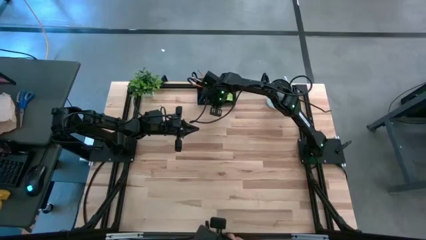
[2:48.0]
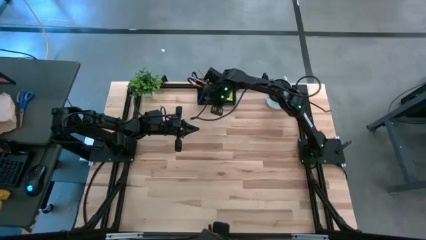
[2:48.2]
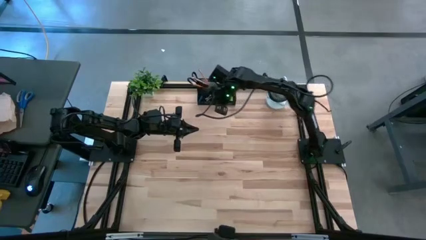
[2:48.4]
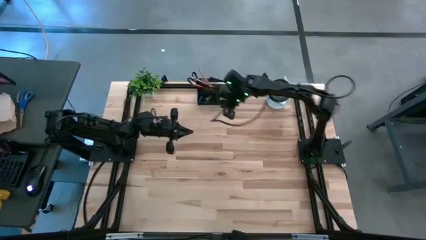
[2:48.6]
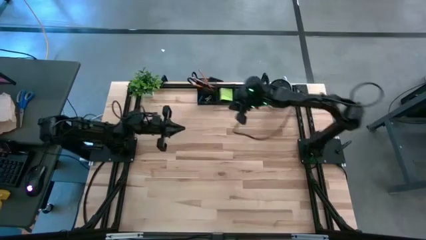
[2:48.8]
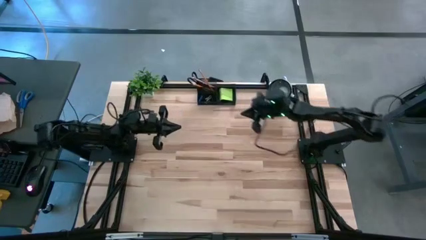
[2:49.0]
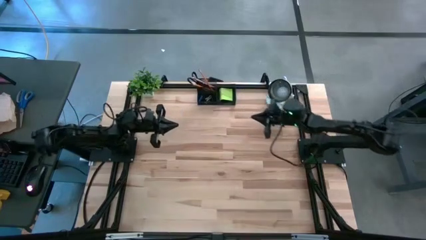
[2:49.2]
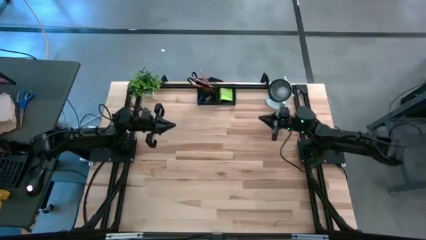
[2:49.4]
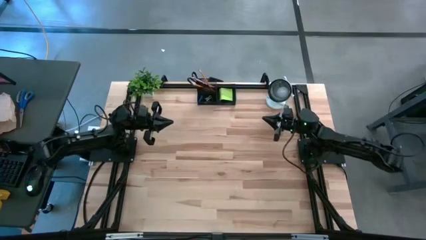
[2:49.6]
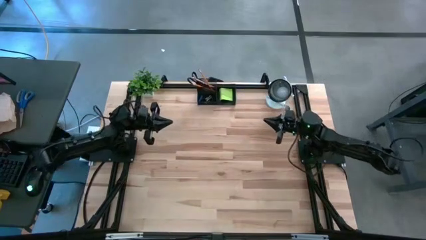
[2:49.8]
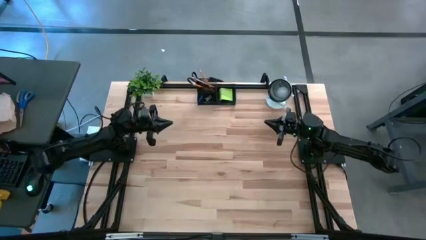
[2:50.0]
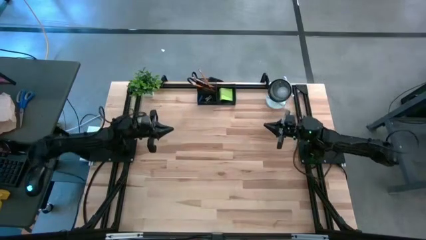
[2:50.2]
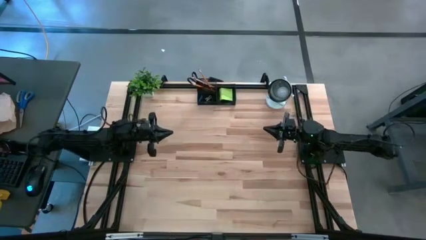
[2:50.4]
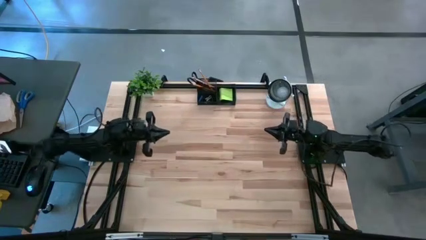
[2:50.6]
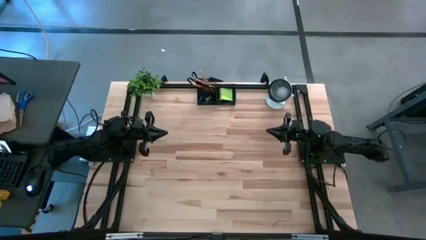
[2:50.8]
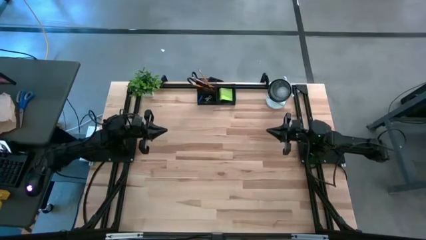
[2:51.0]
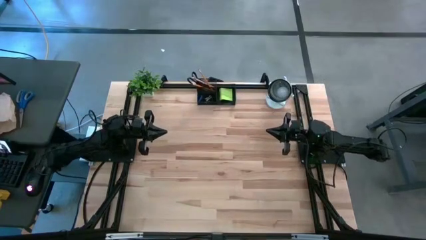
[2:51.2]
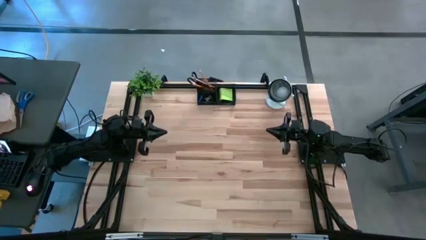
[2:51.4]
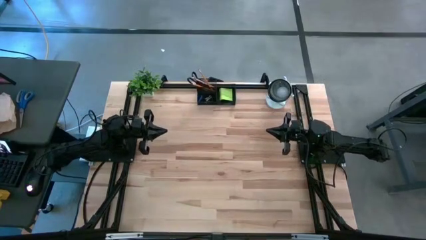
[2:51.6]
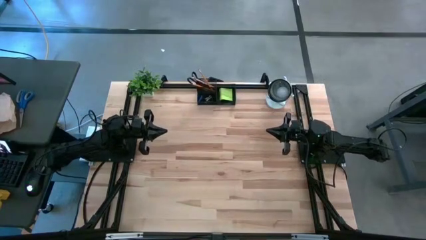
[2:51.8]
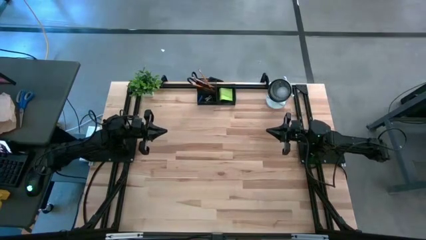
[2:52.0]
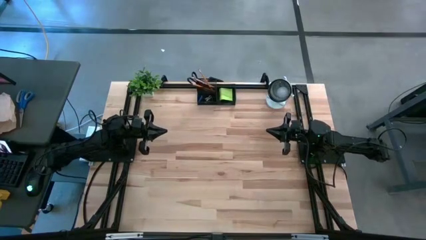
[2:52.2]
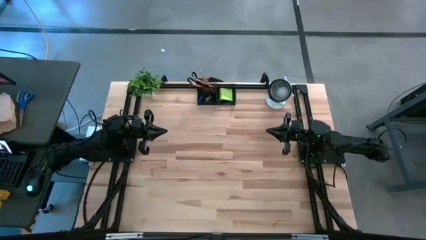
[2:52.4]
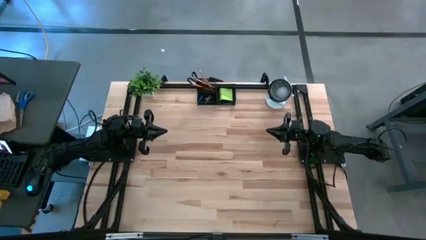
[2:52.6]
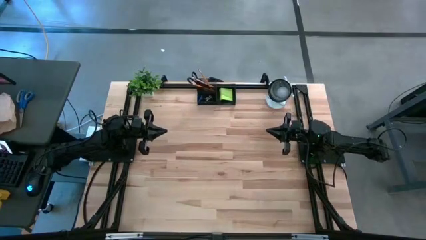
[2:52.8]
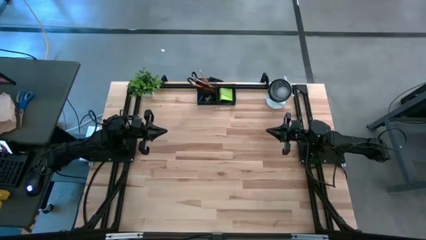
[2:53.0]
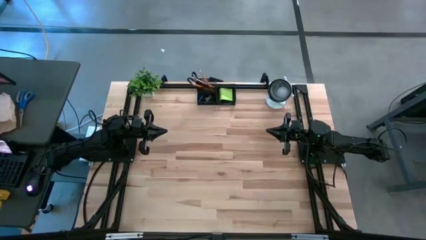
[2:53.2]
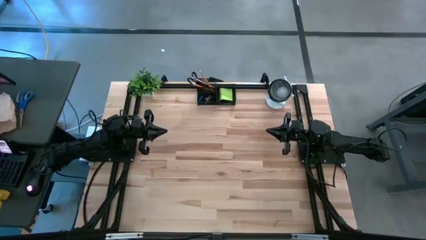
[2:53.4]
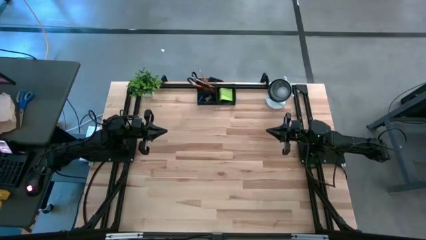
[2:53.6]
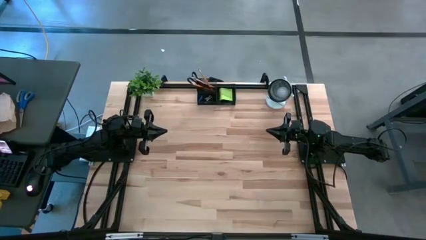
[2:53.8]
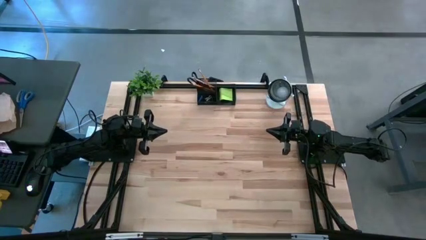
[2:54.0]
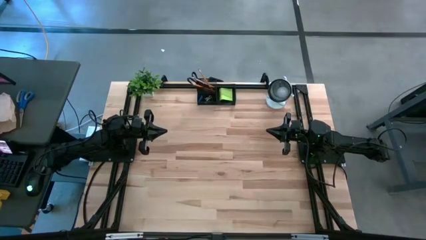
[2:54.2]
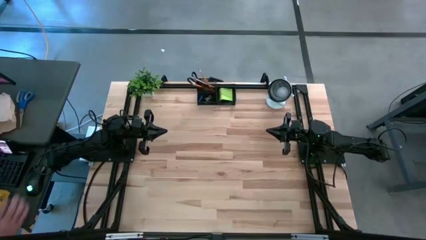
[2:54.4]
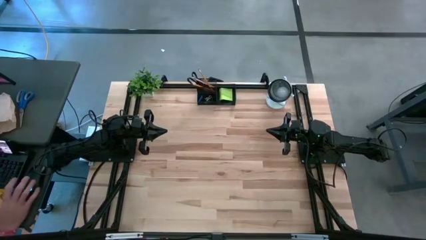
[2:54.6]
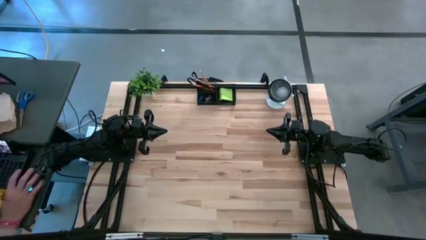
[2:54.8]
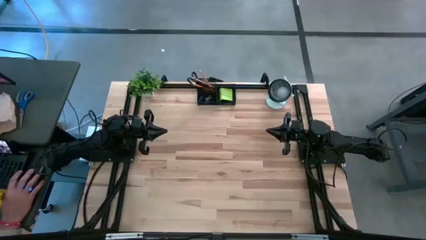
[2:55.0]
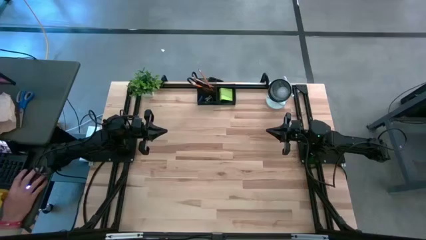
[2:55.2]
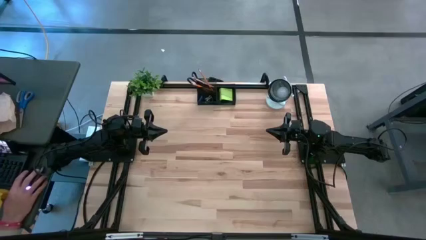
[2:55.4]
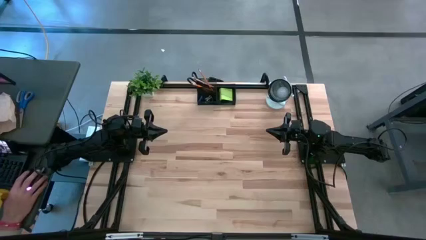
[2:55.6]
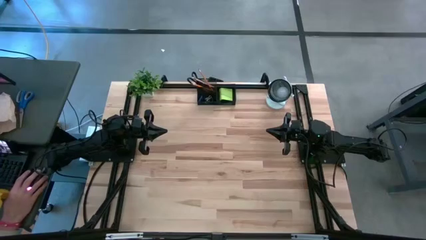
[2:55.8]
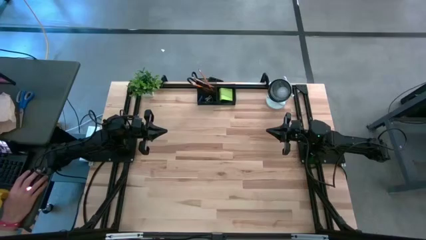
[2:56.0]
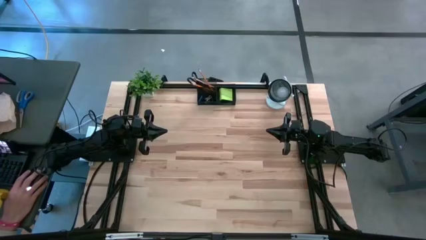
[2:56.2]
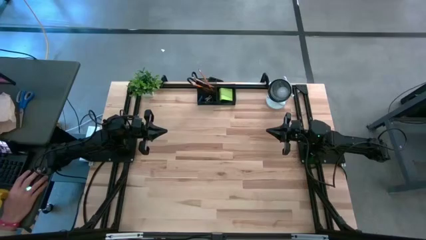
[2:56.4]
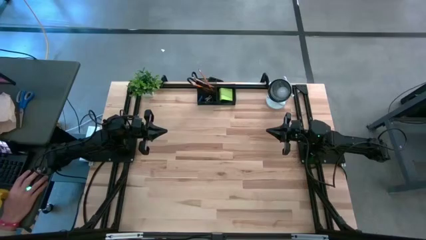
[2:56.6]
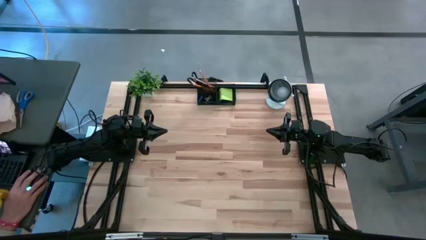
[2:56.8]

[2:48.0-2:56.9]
Task: Pick and place office supplies into organizer
Return to Home Position

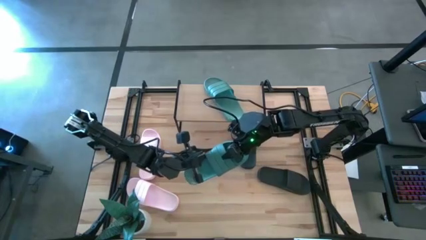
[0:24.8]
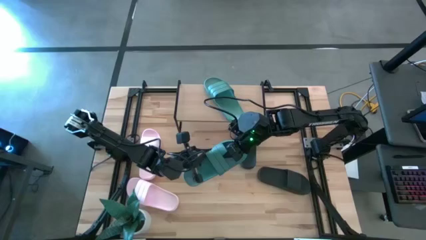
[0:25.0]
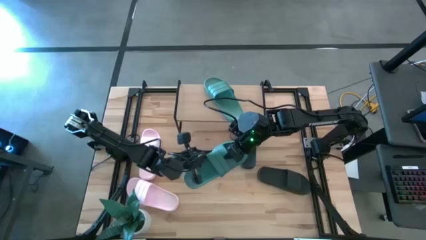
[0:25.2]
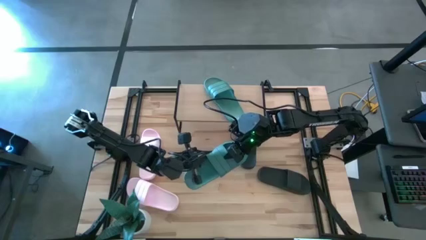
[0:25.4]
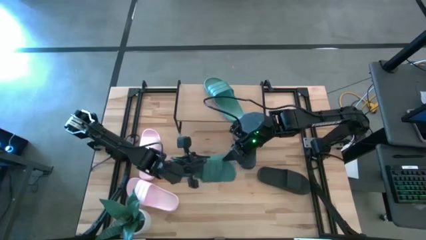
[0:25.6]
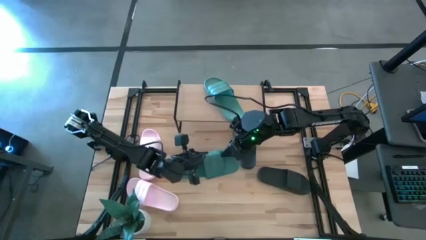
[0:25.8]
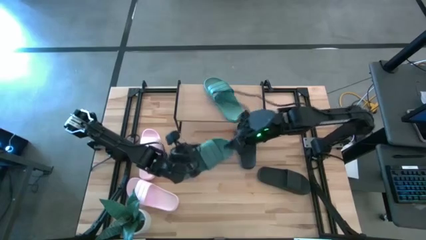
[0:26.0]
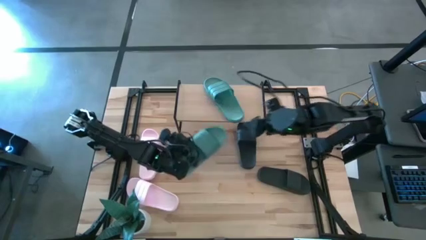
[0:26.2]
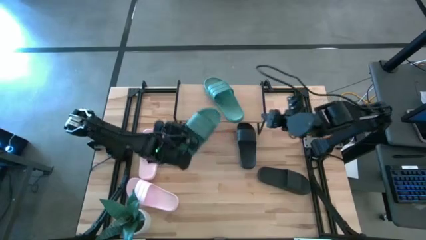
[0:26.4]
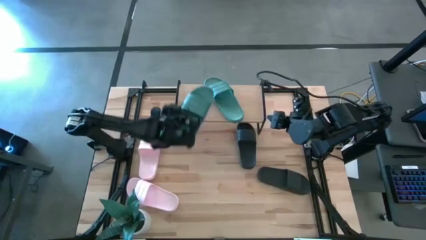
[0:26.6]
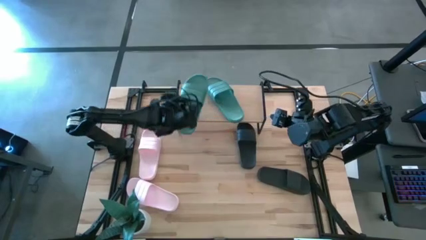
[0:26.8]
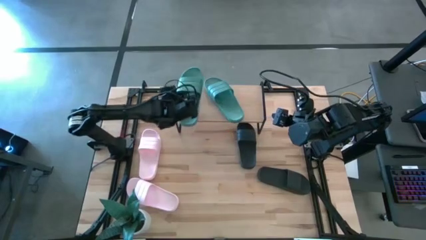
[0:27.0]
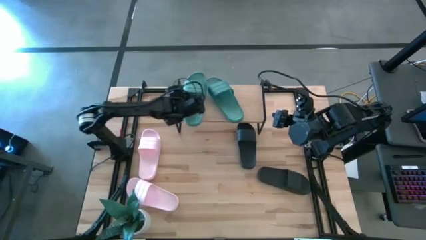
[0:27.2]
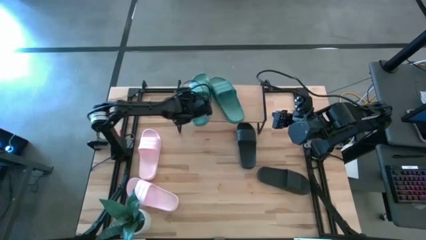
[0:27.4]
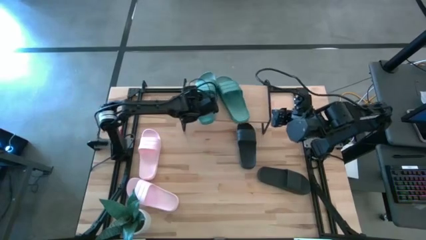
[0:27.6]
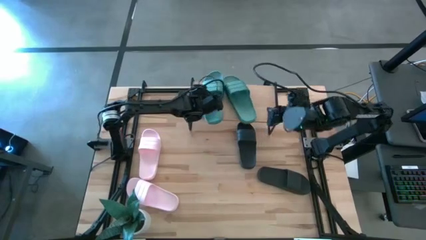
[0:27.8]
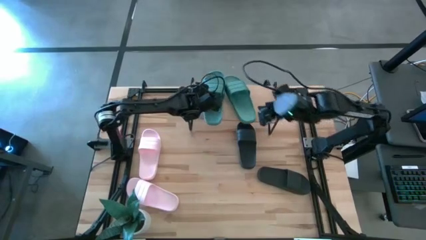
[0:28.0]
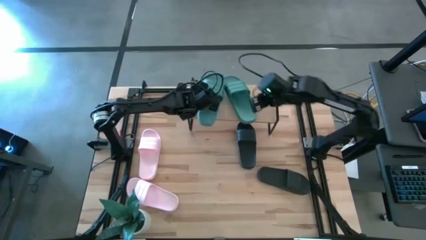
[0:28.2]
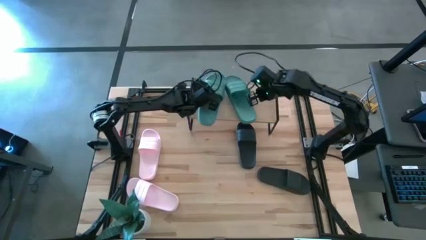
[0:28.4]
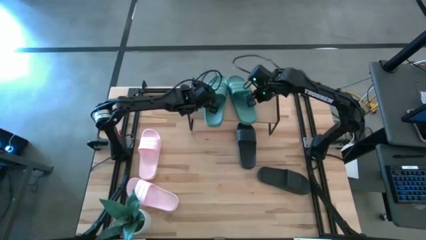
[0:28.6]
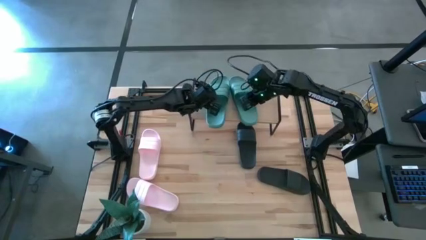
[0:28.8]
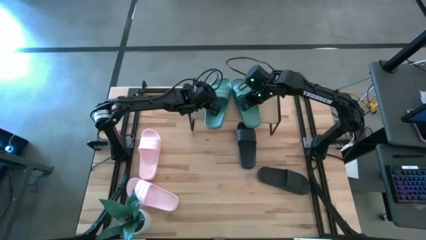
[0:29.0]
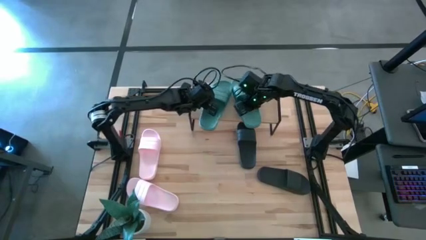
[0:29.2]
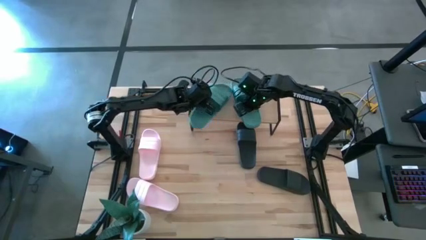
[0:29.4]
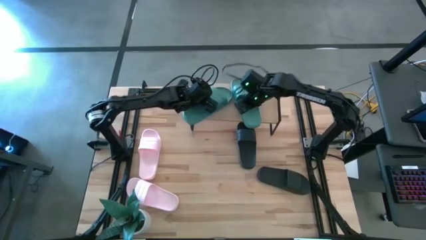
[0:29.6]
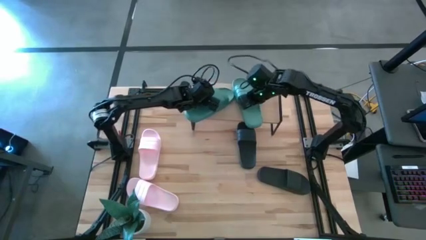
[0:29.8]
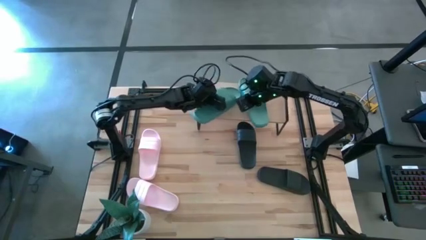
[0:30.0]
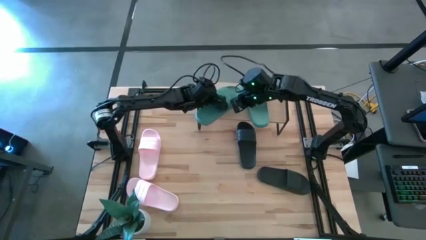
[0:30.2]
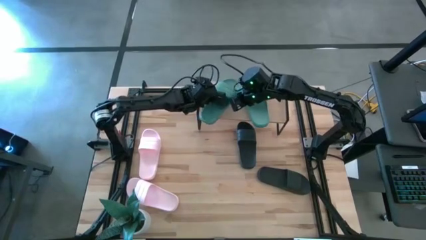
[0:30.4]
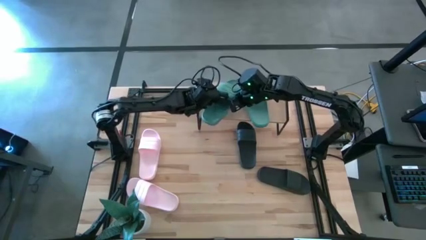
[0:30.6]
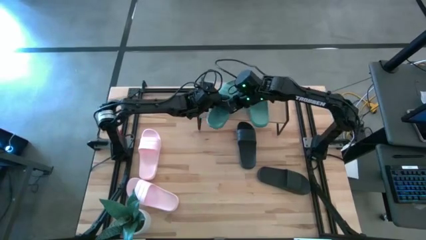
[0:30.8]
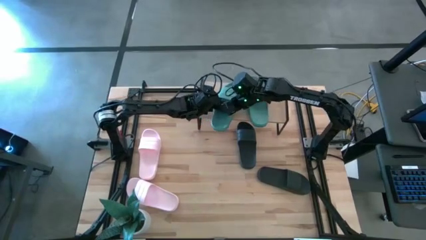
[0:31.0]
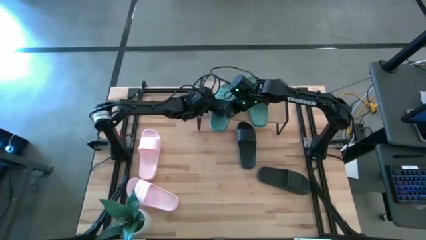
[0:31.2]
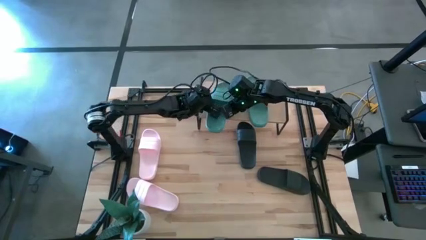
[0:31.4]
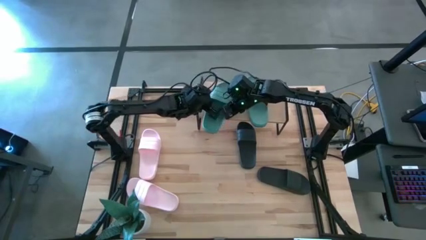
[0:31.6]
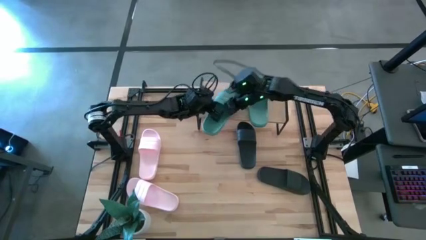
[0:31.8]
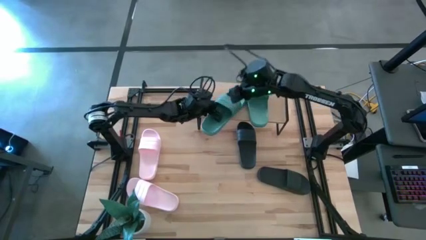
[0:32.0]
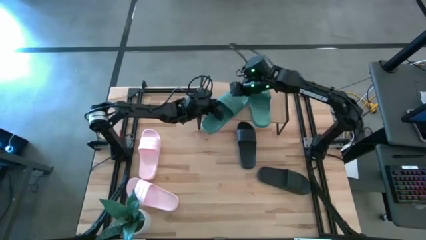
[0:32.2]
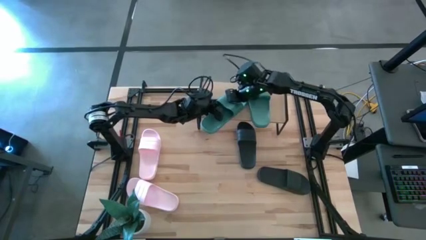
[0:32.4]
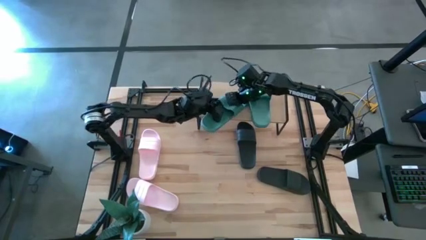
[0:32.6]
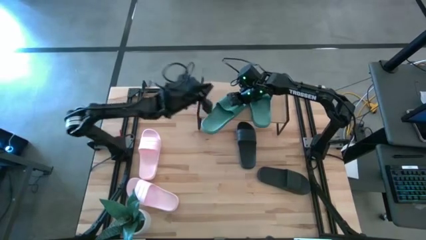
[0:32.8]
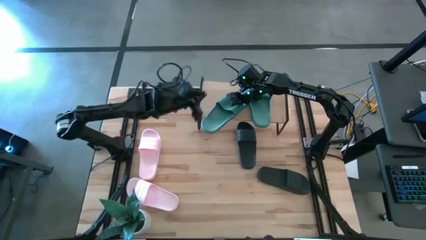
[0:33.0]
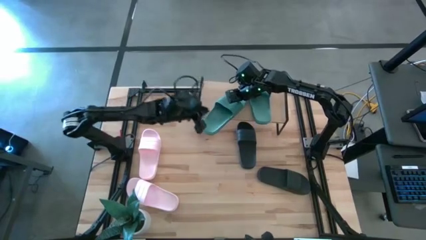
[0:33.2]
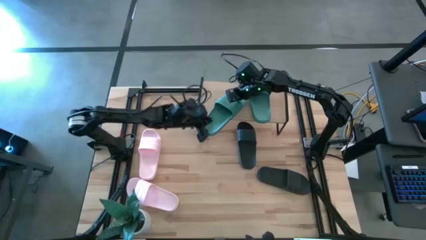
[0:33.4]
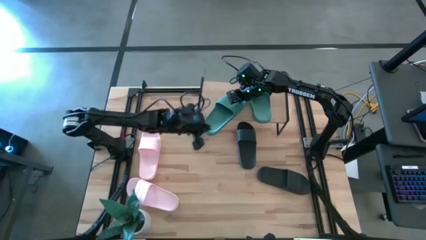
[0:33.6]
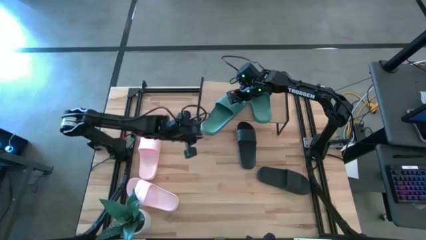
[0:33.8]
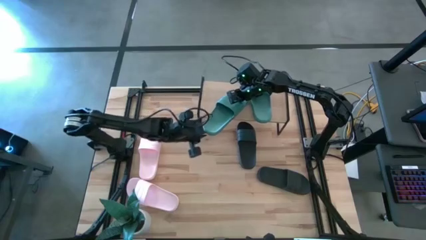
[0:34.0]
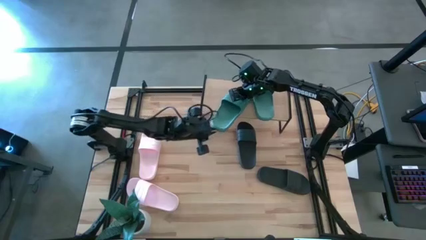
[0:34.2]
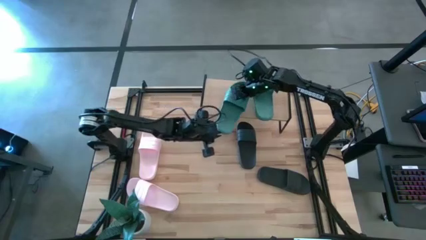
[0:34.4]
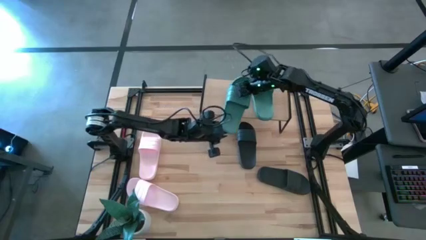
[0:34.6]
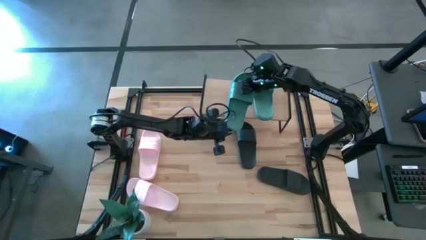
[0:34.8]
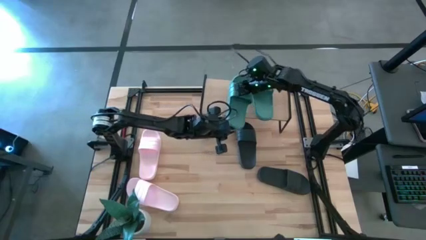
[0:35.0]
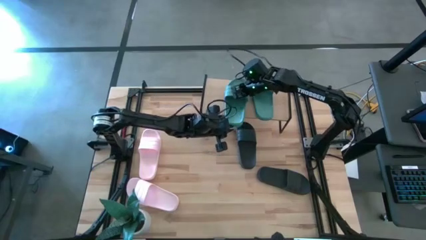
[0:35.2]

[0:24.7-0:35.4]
Task: Pick and place slides into the shelf
Put the green slides on the shelf
